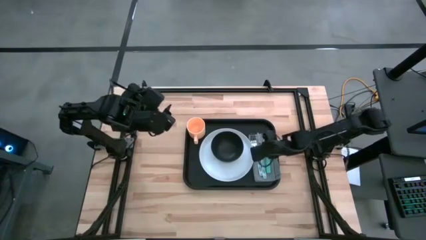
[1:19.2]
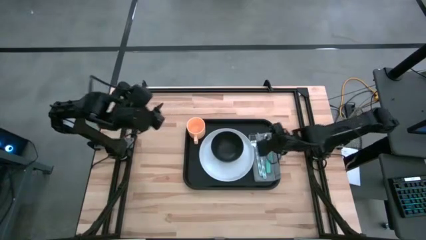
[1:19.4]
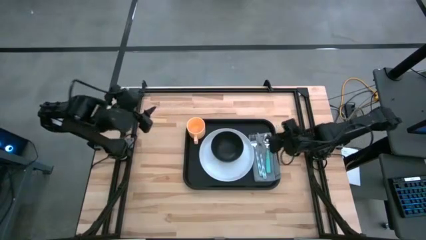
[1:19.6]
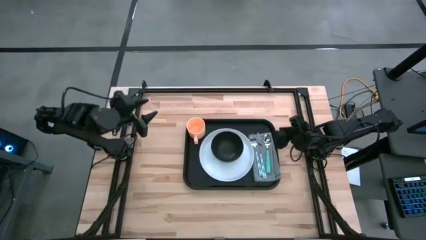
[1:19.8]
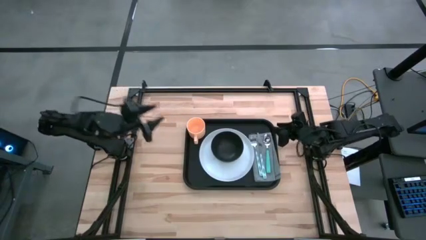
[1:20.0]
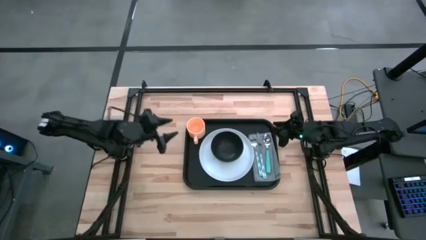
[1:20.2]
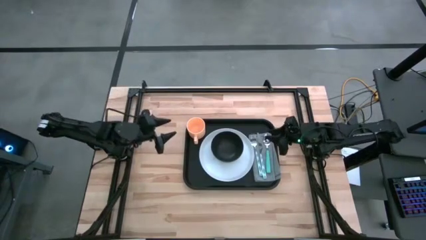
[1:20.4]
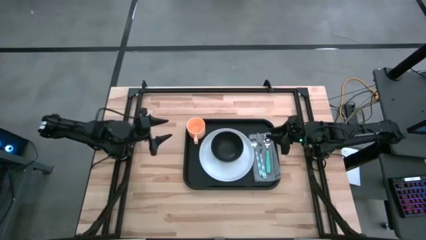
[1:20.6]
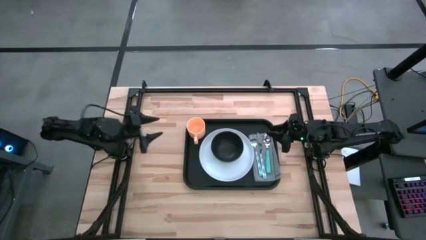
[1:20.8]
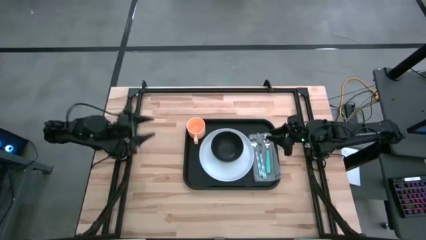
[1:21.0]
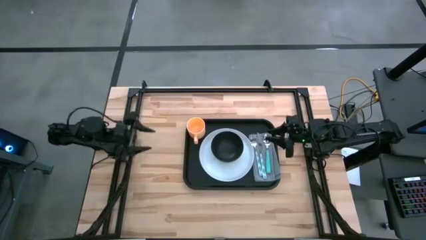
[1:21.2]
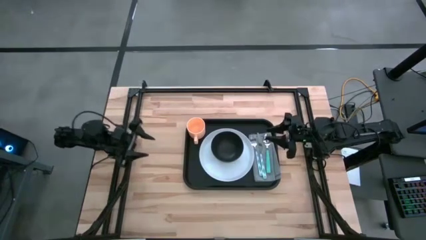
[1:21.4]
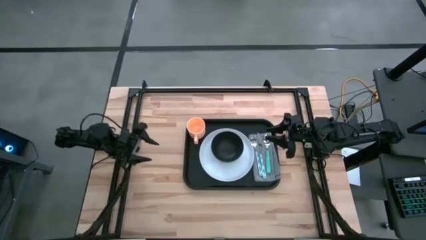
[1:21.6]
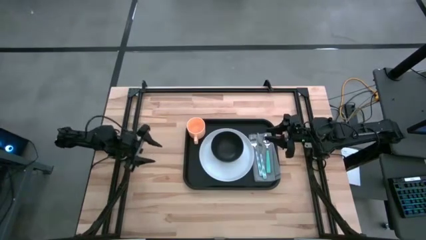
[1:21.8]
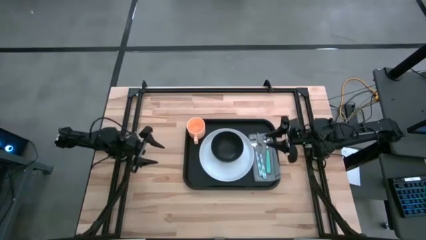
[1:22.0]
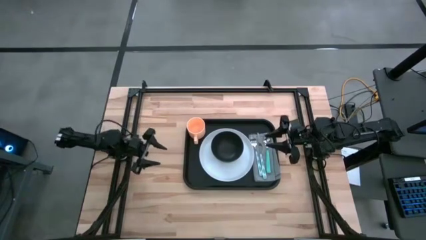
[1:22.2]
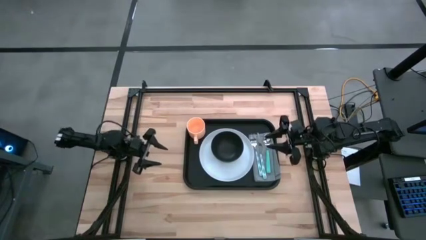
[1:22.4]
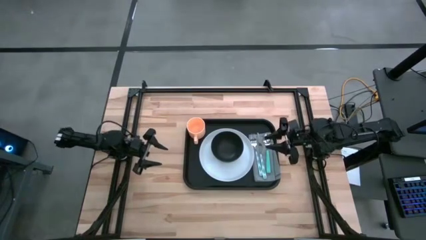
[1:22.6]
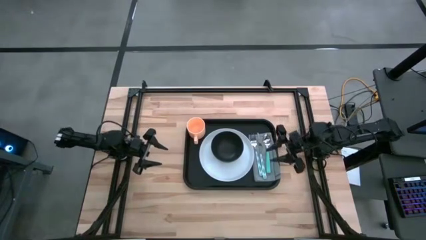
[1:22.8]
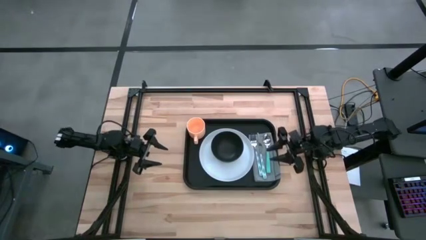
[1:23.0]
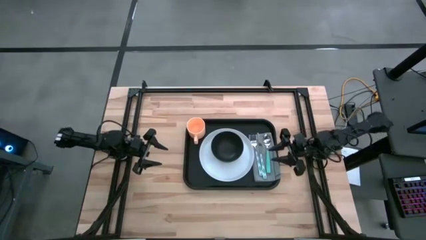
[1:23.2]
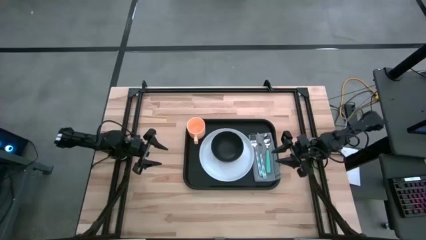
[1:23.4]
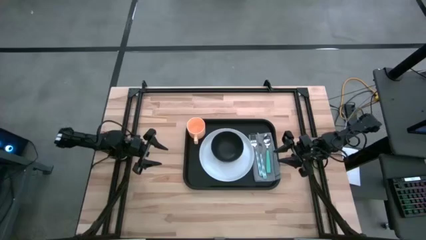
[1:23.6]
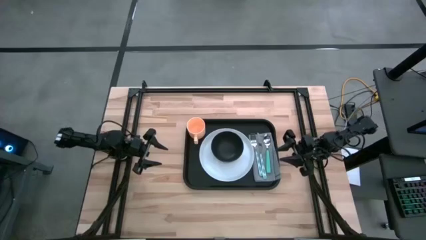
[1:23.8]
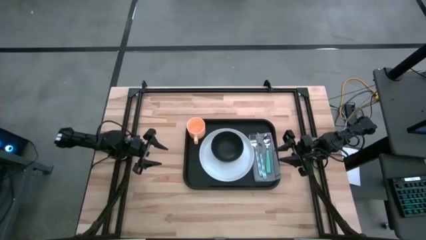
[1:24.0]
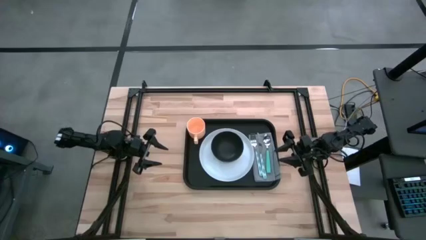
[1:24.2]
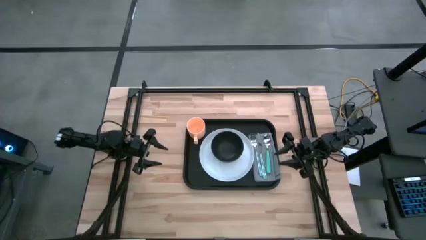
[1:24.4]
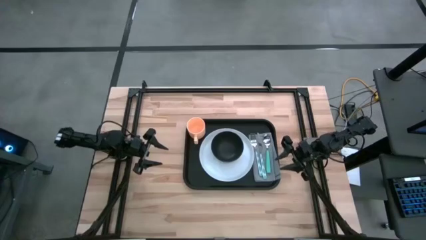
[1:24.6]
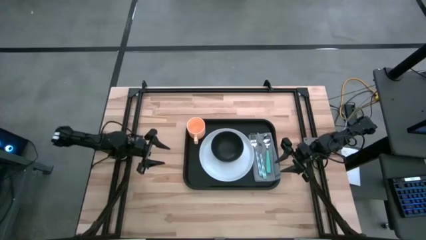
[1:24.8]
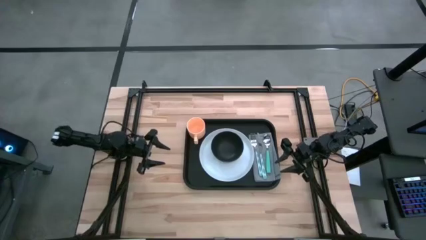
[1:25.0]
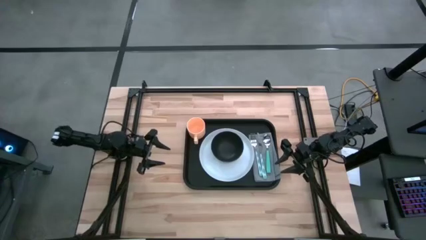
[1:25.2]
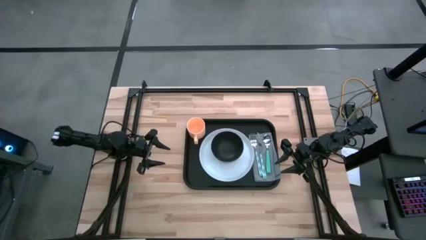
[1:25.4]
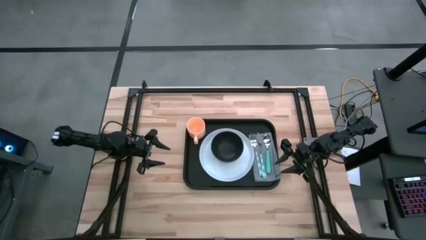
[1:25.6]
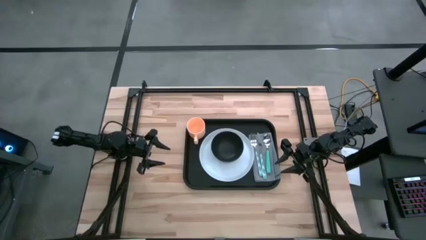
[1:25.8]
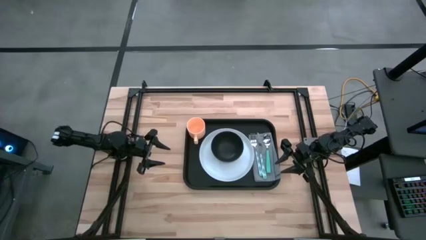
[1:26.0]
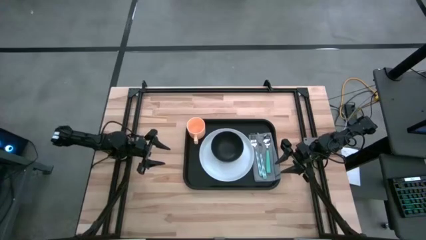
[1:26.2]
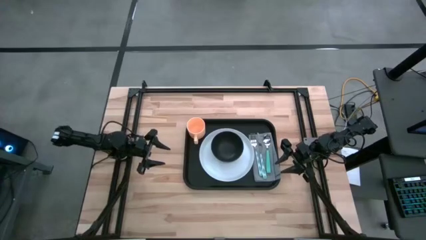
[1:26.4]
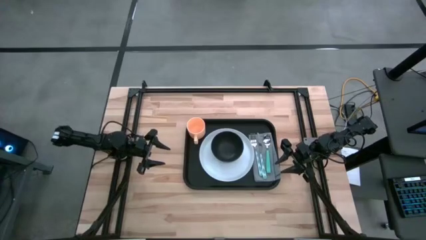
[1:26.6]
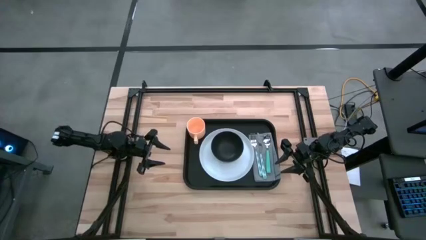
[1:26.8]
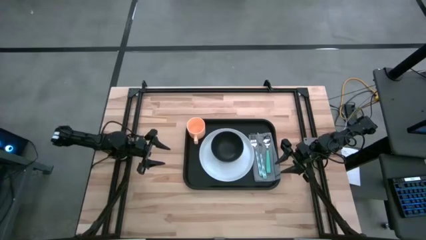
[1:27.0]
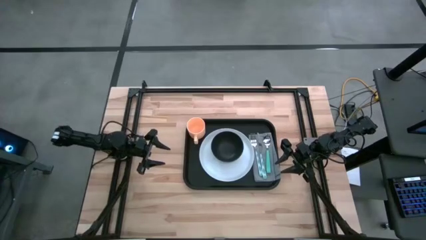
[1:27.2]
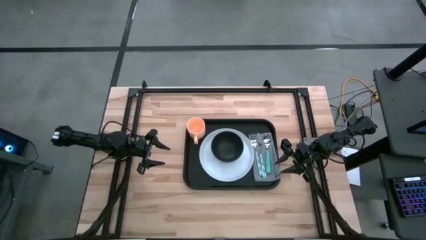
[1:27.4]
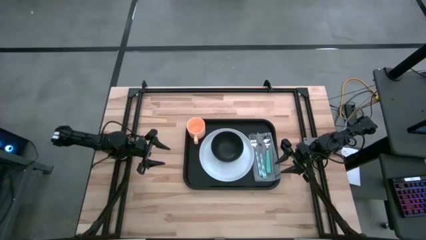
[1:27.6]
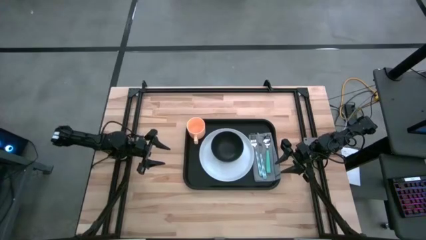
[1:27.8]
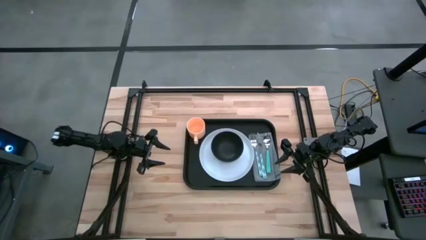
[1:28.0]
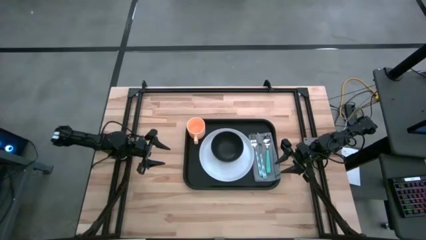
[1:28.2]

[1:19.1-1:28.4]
Task: Set up tray
Return to Home Position

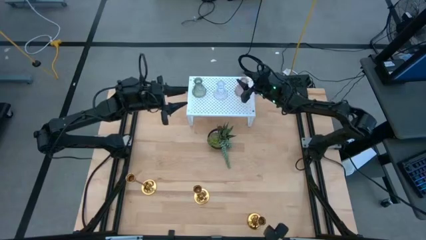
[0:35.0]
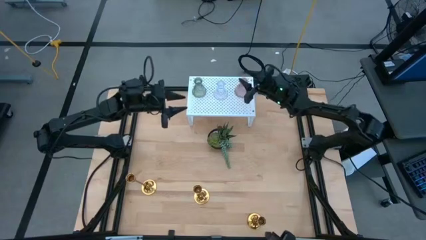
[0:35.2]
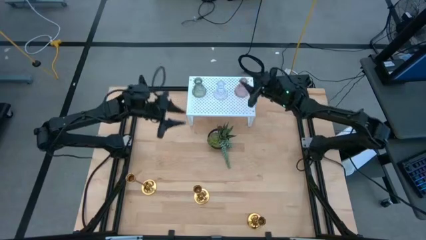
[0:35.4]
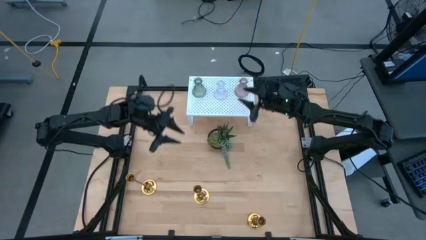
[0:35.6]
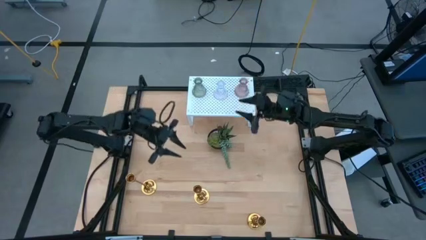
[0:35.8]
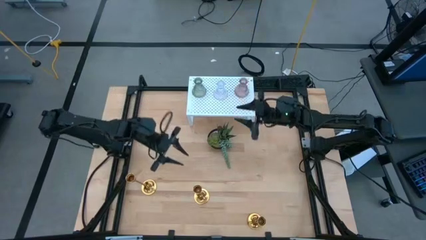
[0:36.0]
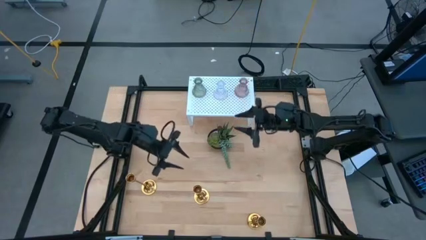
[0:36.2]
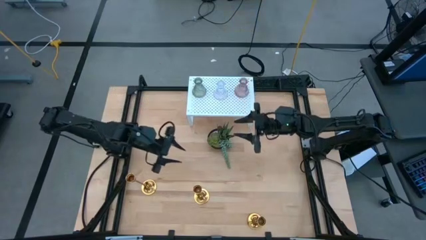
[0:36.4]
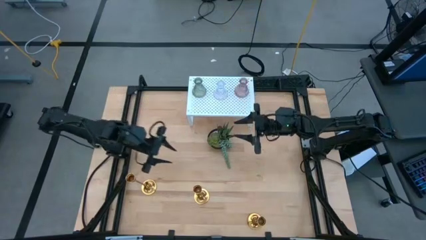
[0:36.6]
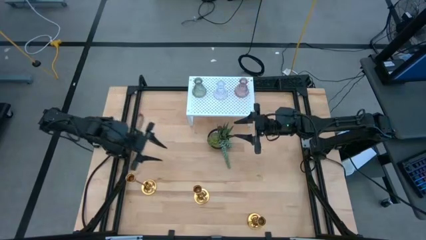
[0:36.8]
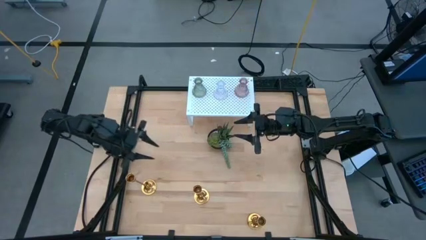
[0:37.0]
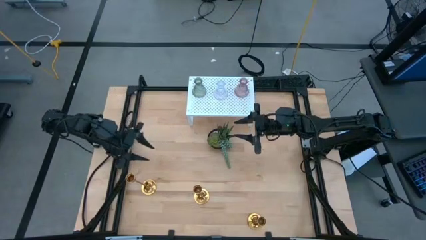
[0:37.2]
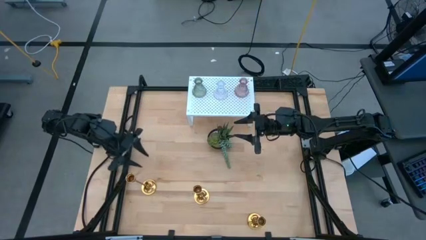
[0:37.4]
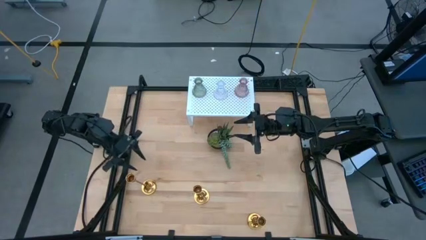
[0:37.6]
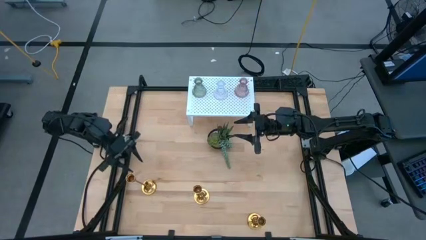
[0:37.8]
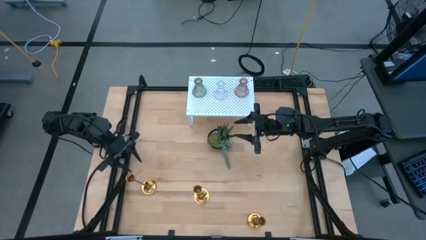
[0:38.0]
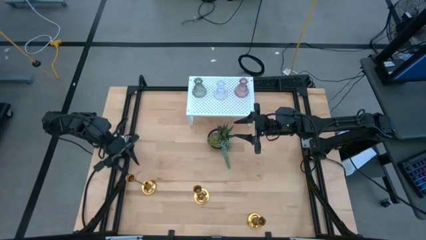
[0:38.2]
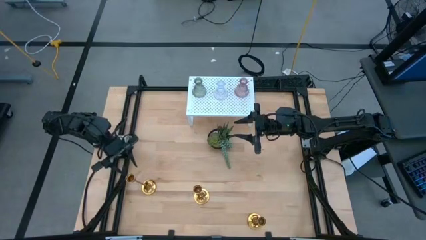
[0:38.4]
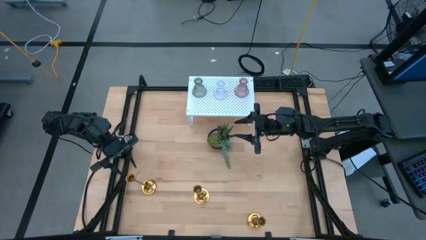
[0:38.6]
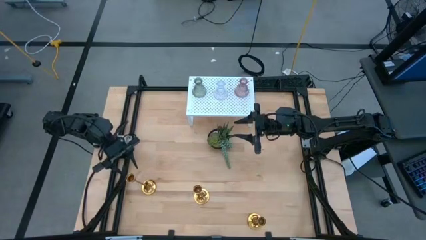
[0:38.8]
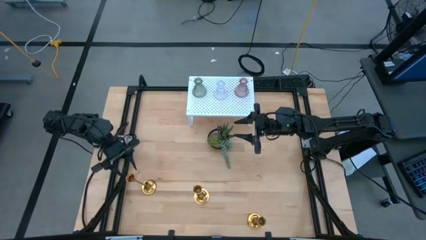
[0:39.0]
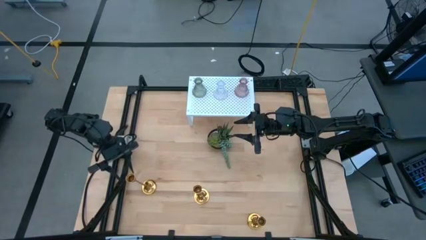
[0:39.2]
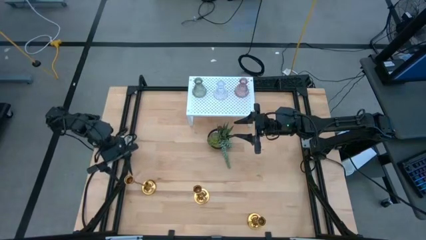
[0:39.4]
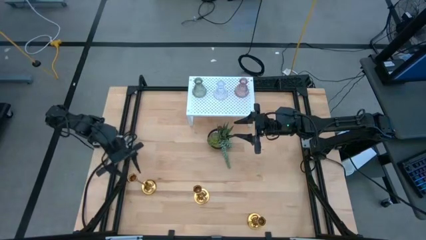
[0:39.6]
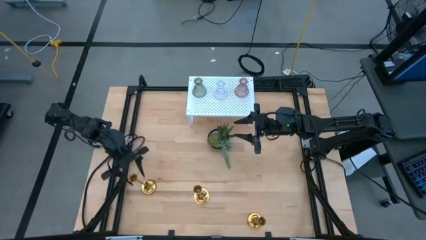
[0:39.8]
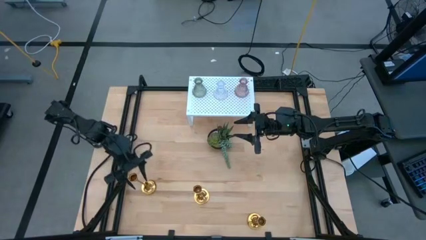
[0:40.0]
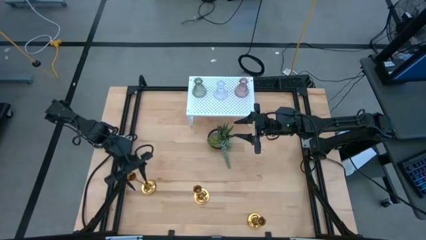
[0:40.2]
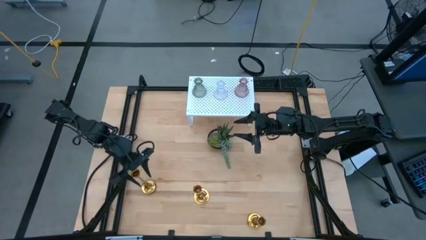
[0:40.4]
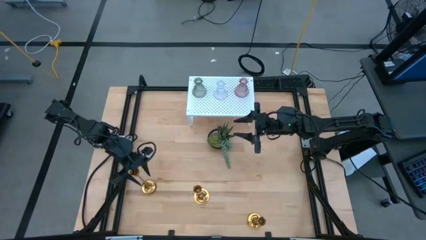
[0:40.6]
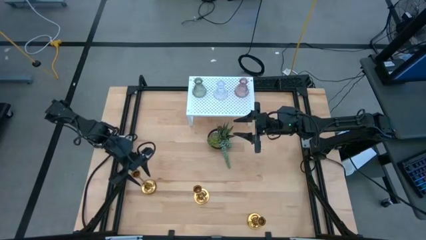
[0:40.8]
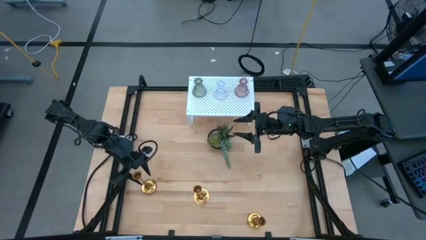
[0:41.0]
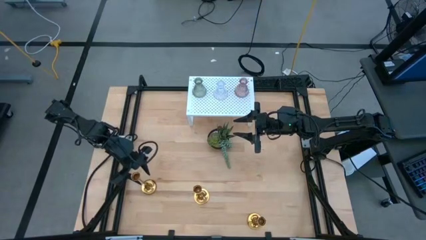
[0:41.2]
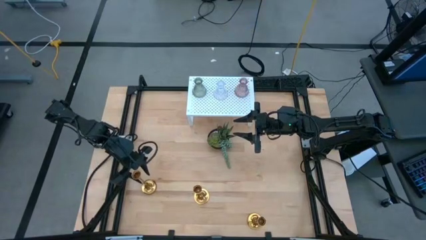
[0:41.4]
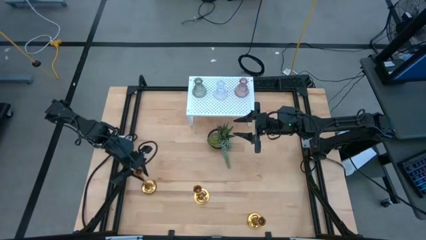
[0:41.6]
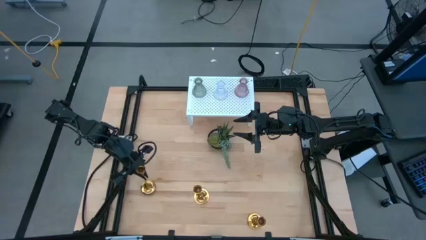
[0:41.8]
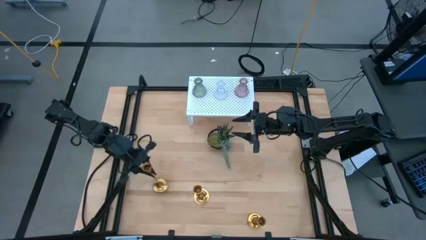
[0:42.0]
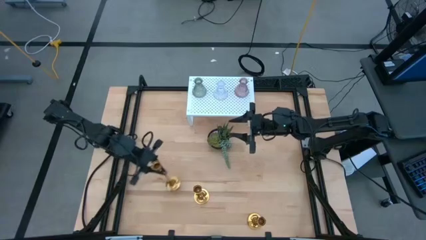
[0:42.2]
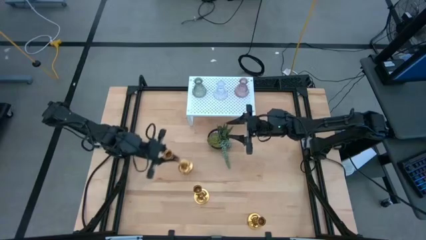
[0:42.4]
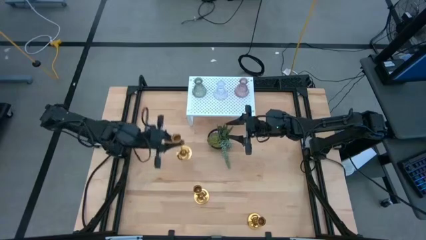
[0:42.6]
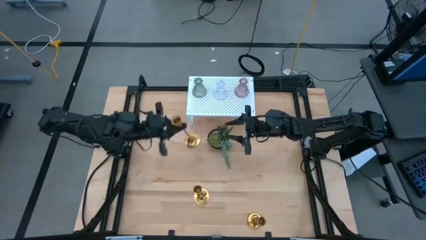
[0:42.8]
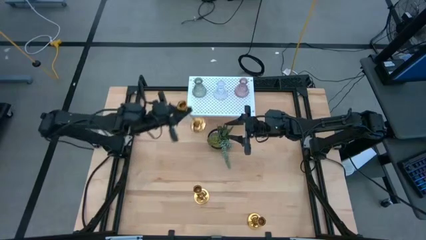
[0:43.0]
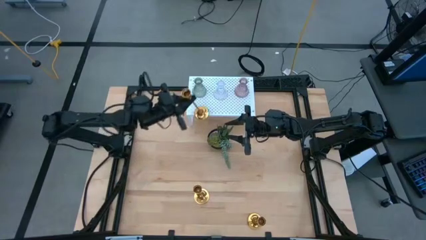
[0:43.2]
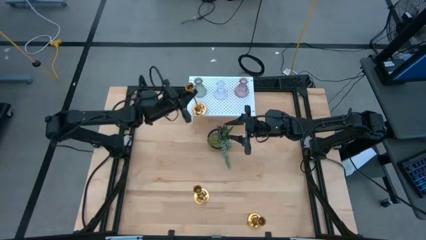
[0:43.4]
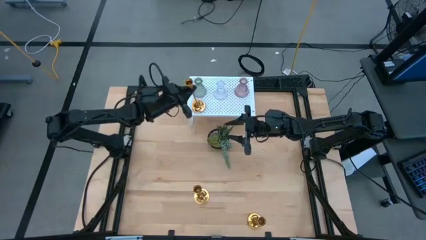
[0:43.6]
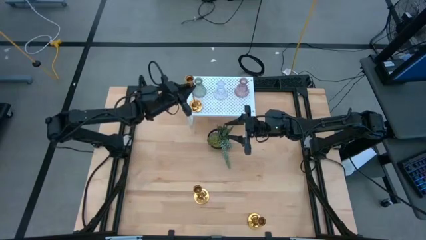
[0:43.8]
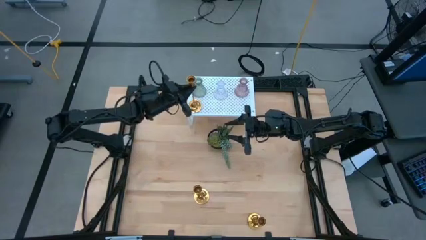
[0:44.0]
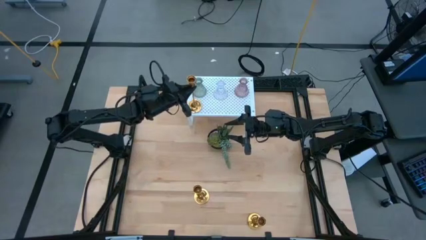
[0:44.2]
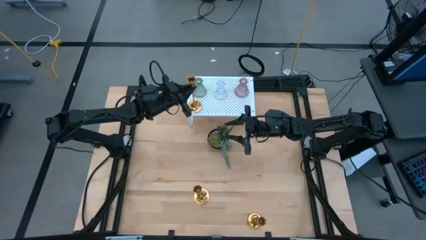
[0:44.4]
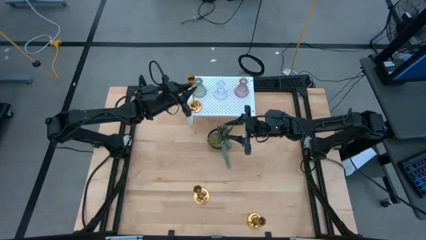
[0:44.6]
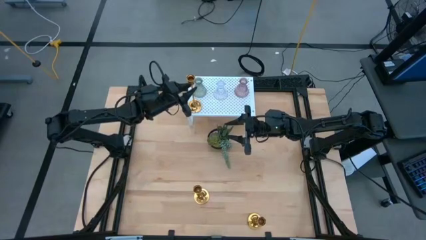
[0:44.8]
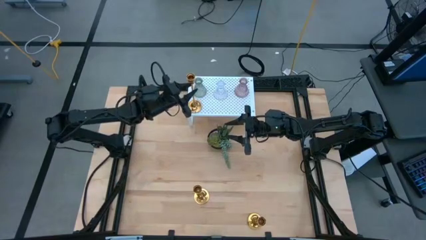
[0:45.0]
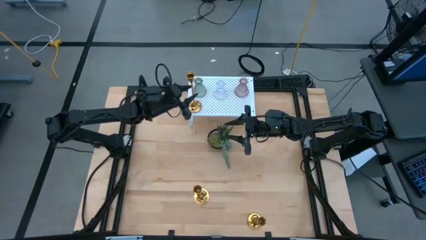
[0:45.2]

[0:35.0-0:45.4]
Task: Pick & Place candle stick holders
Put the left golden candle holder on the shelf aligned with the green glass candle holder
